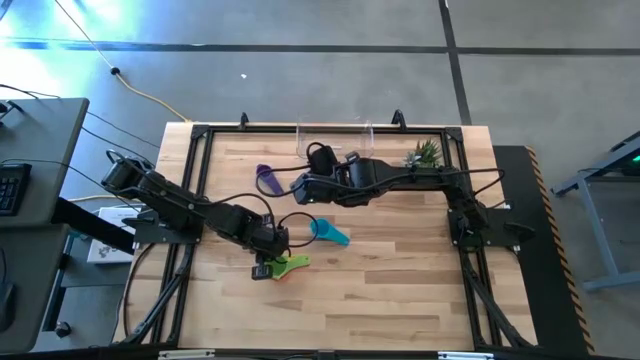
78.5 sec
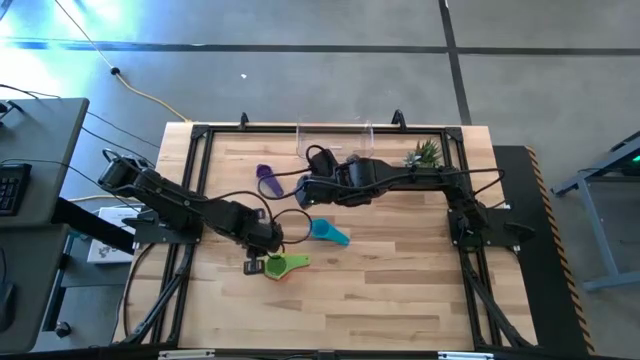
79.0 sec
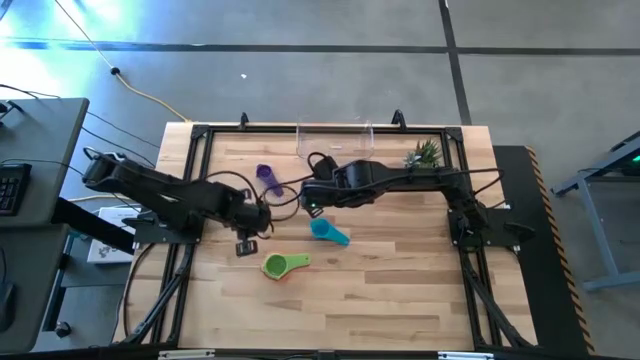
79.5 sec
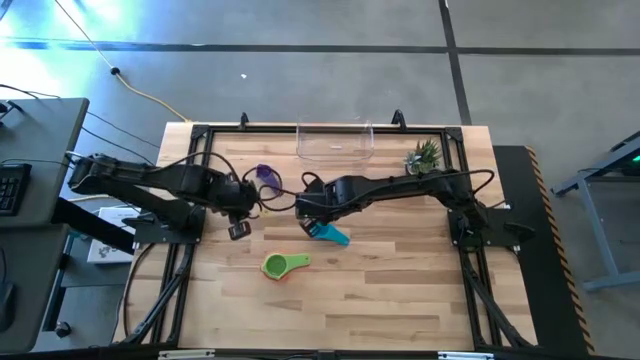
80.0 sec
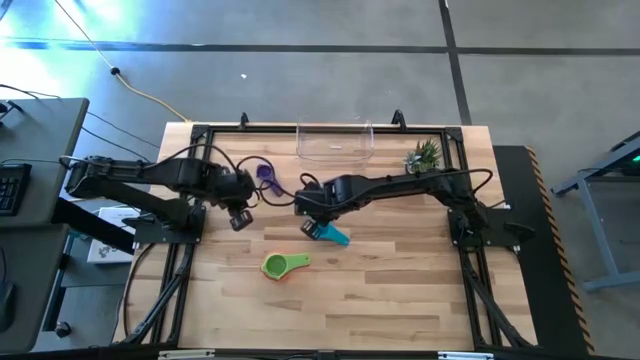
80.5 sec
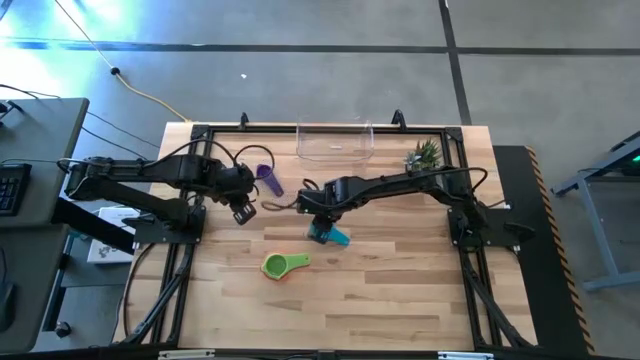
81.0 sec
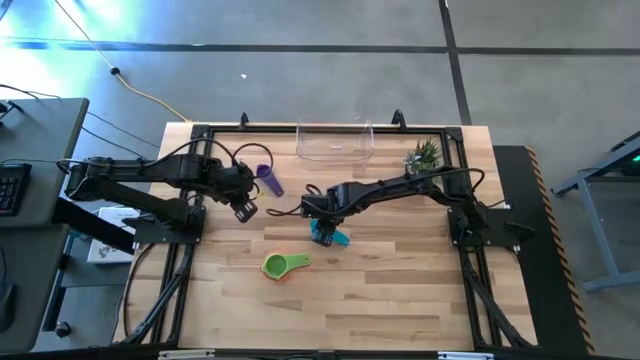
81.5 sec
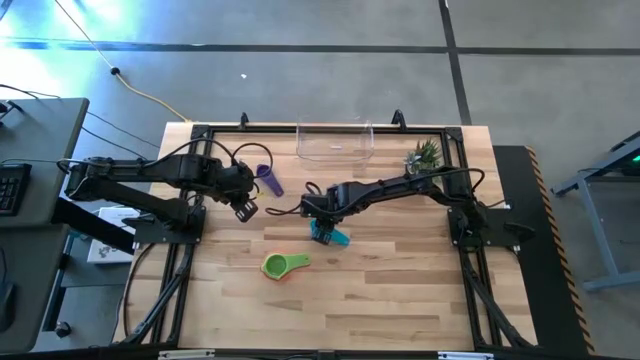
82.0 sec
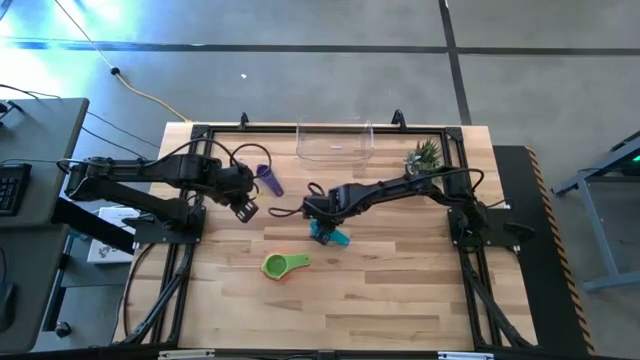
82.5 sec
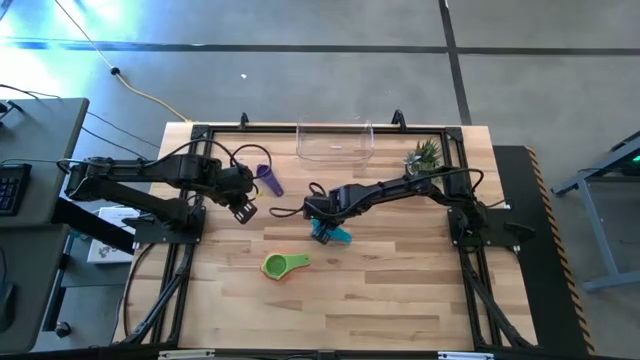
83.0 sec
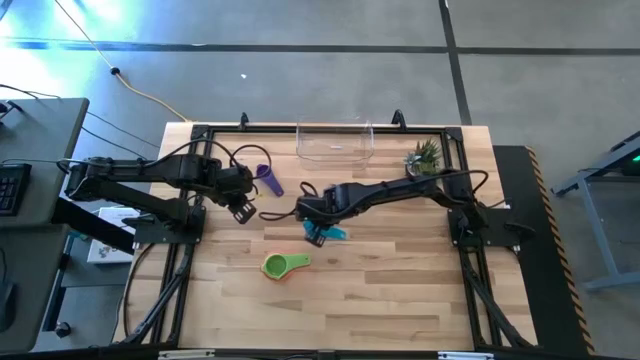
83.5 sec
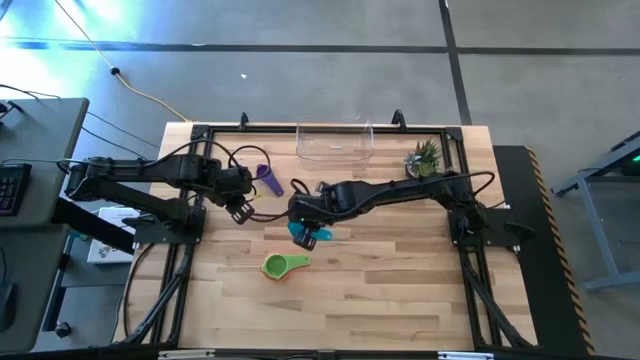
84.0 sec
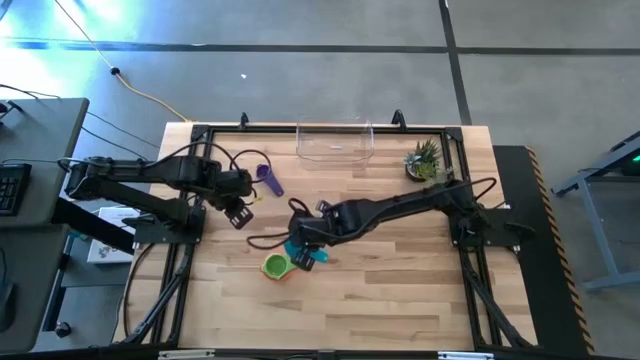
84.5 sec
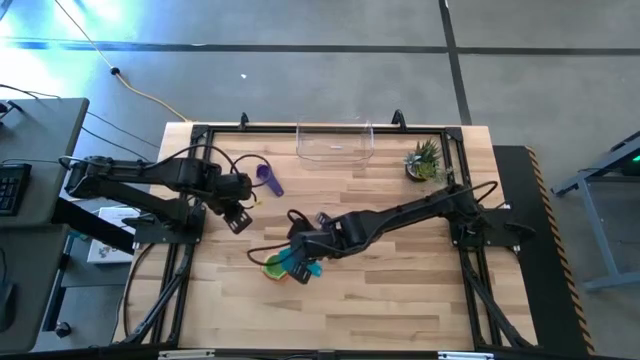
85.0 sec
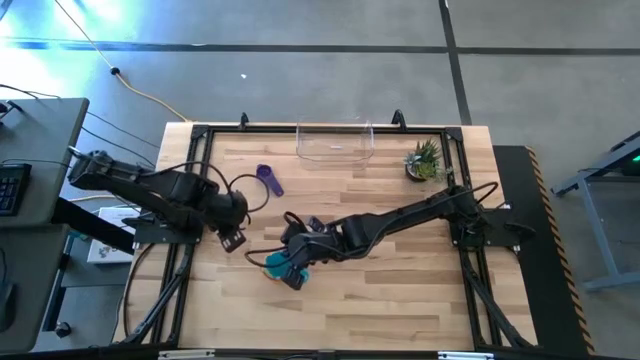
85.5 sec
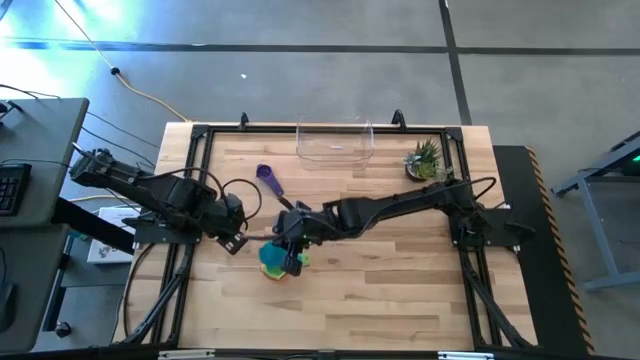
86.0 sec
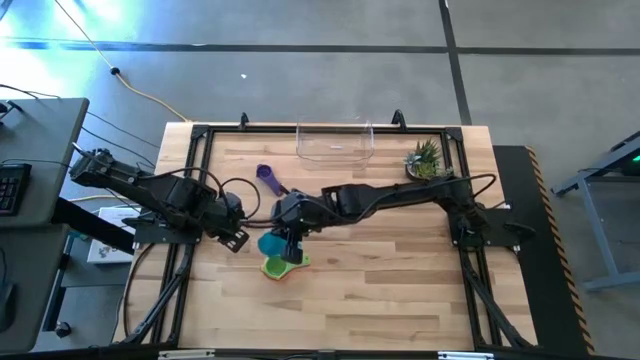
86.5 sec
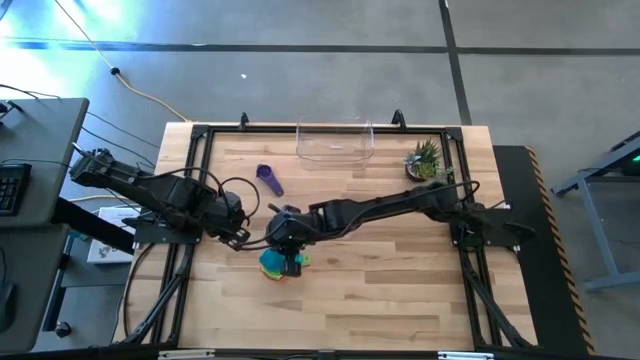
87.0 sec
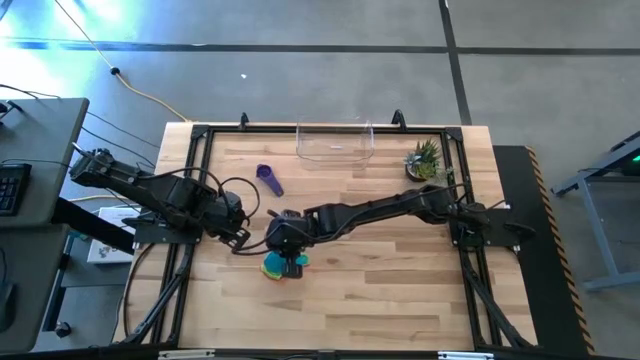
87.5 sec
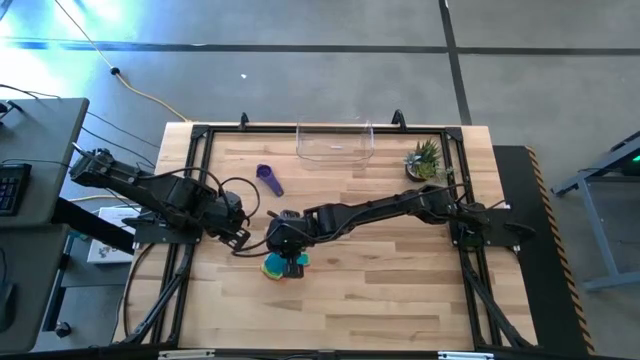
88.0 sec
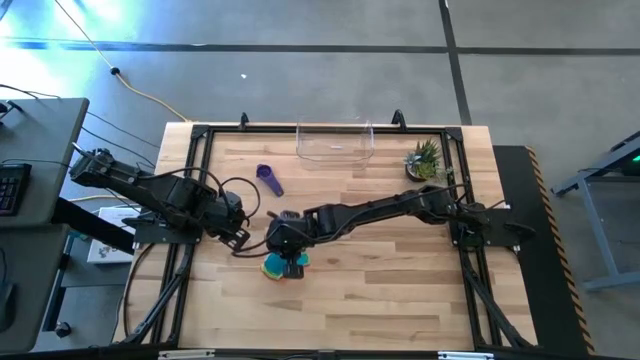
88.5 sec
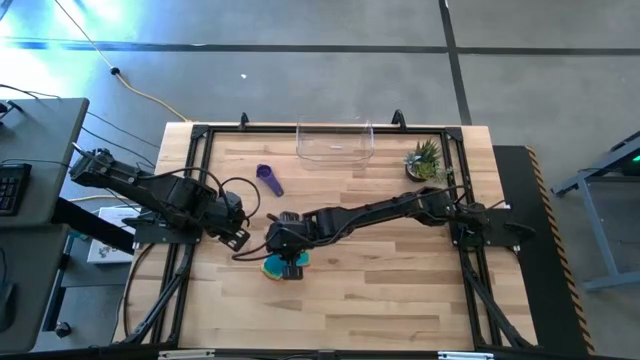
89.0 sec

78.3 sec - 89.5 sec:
Task: Nest measuring cups in basket
Stack the light blue measuring cup on top of the green measuring cup

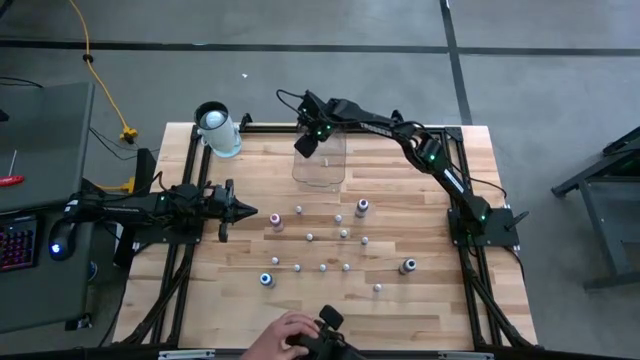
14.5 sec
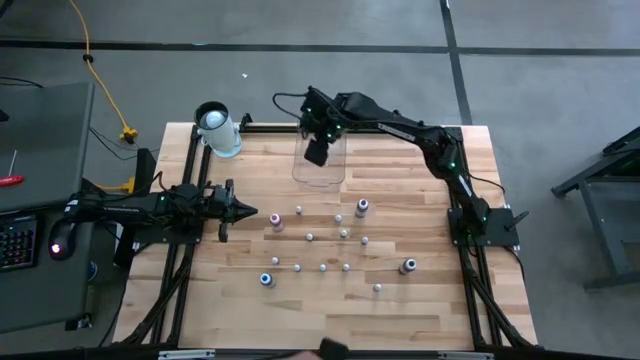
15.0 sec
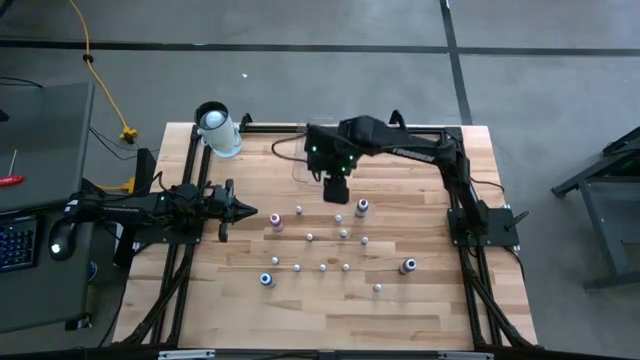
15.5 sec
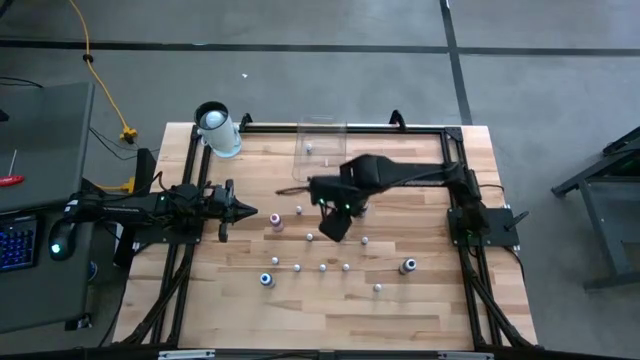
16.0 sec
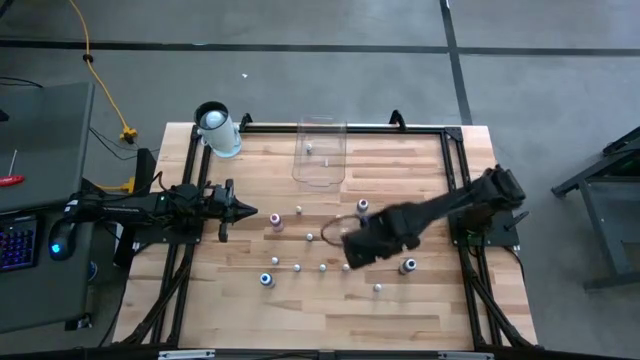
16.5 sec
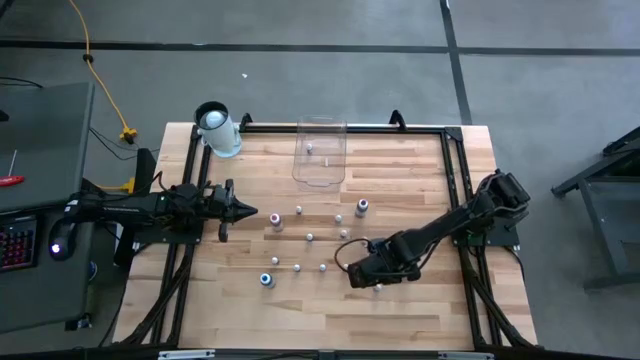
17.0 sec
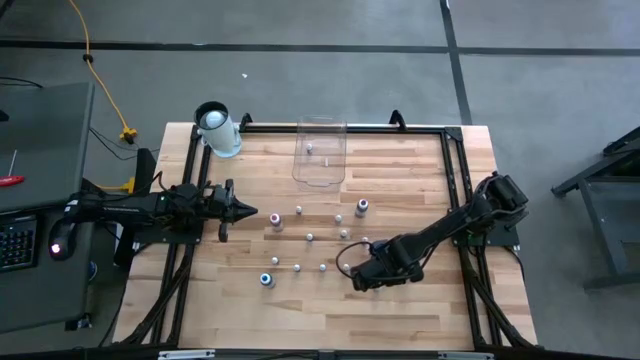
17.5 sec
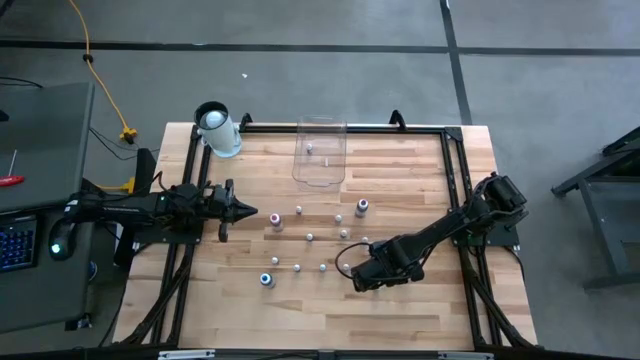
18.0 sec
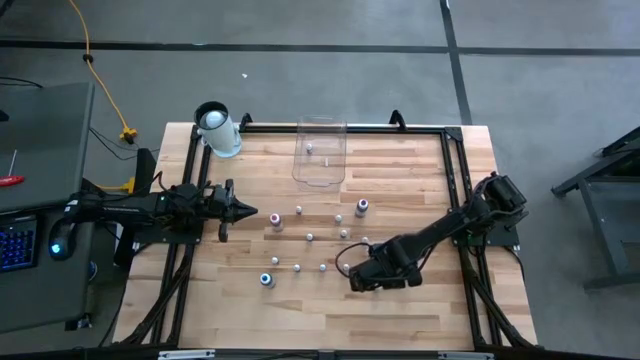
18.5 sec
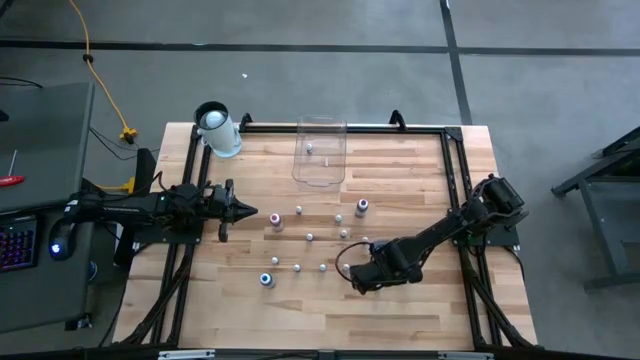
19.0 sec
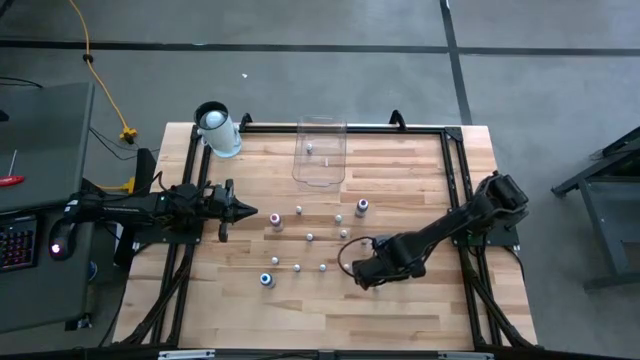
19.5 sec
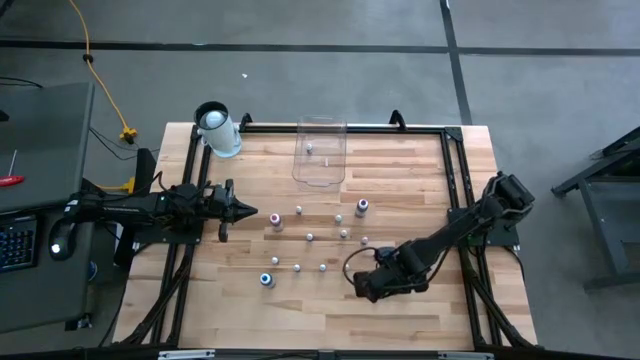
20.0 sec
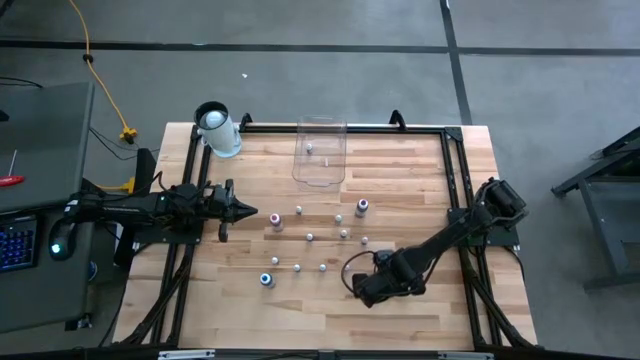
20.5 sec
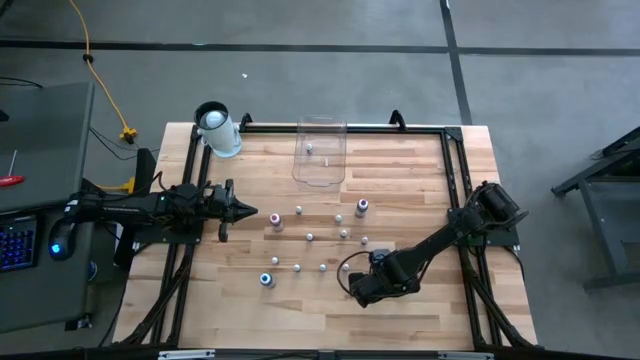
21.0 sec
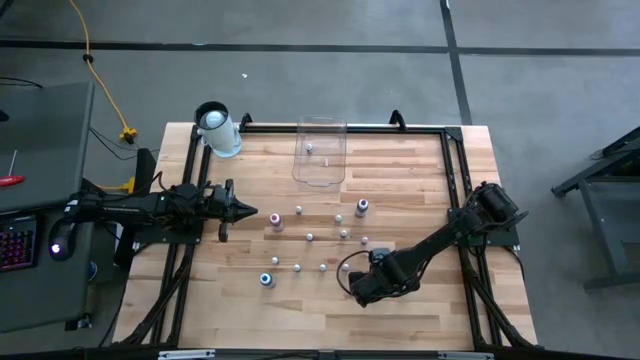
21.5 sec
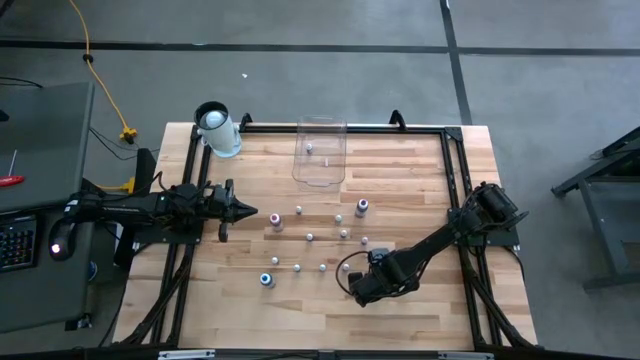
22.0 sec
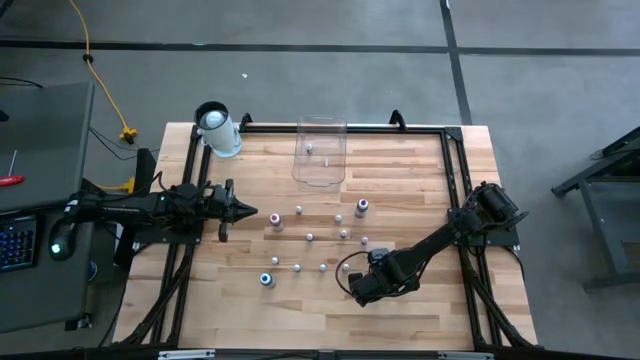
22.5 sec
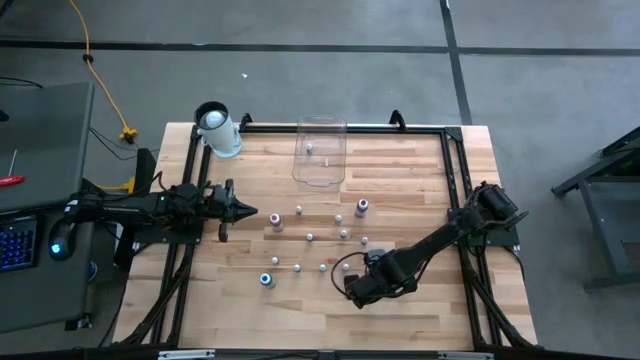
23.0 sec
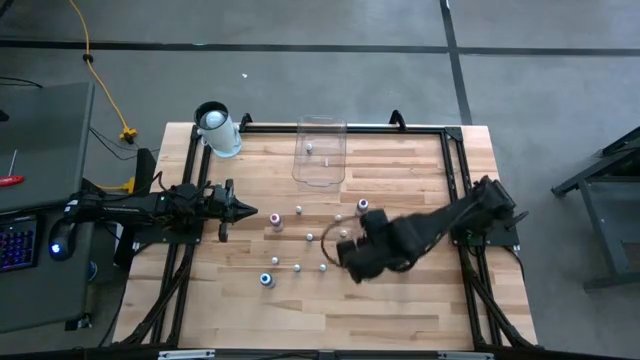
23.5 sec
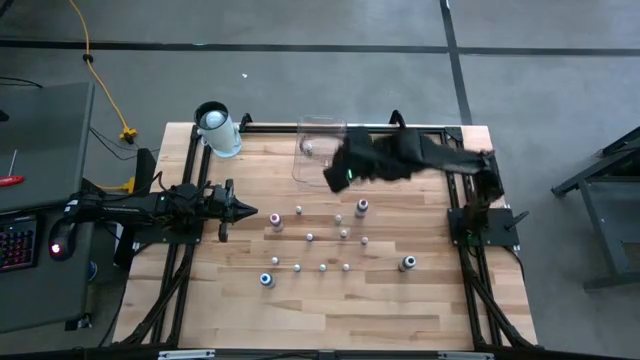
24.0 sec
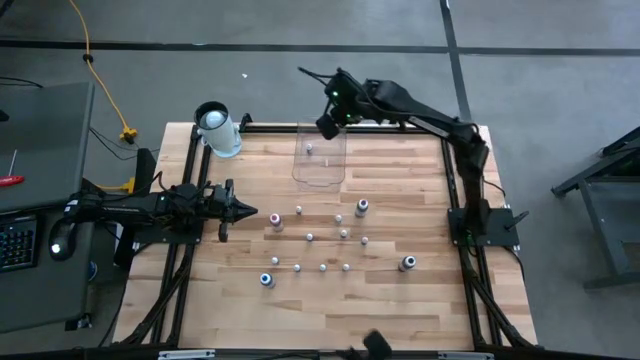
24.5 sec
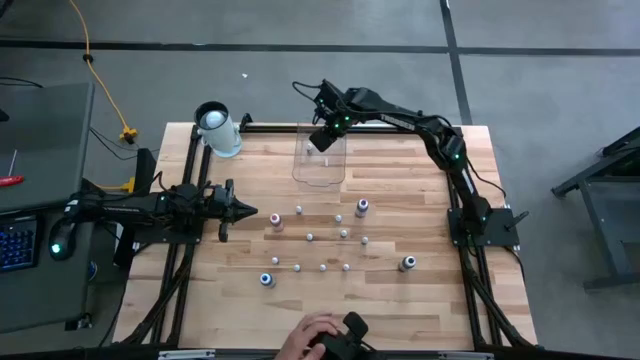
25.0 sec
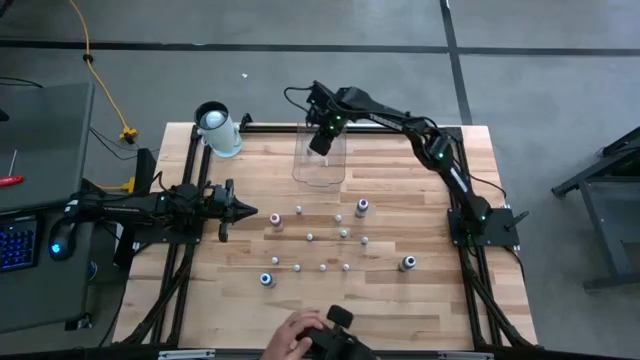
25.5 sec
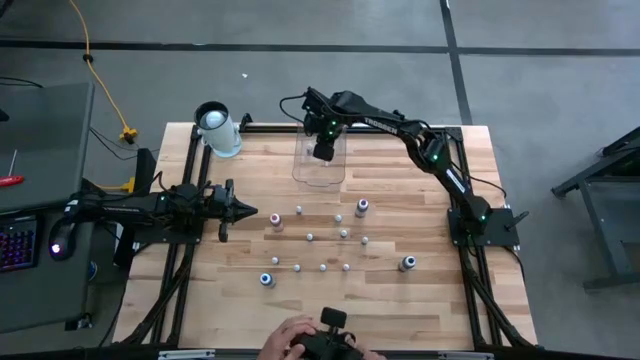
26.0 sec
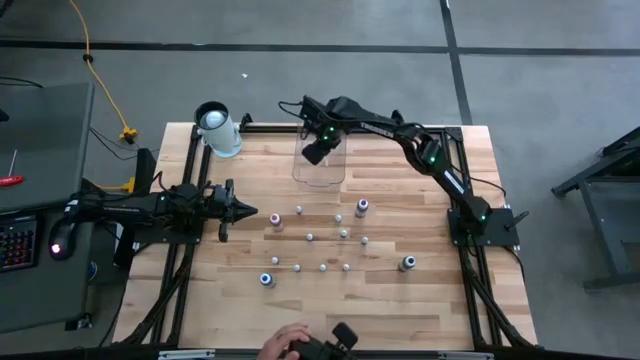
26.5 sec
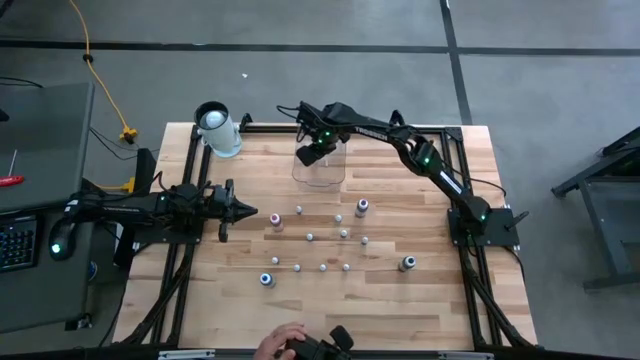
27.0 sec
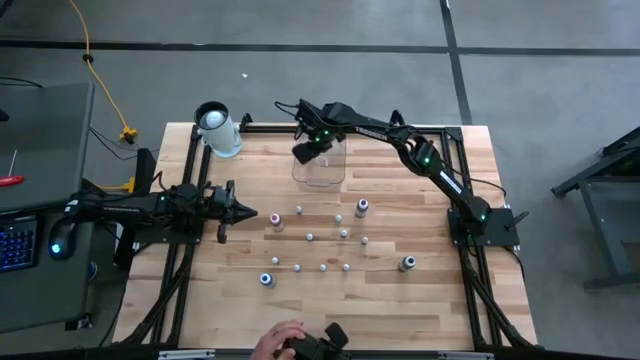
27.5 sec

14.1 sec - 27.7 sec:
Task: Pick & Place food coloring
Put the small violet food coloring bottle into the container
